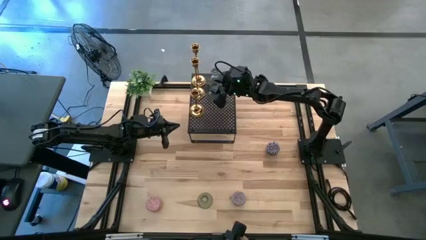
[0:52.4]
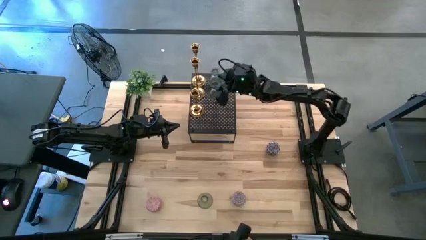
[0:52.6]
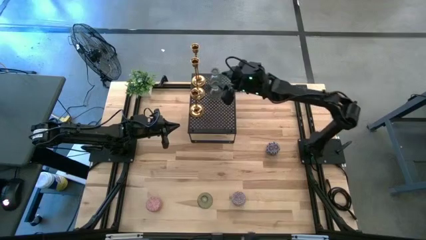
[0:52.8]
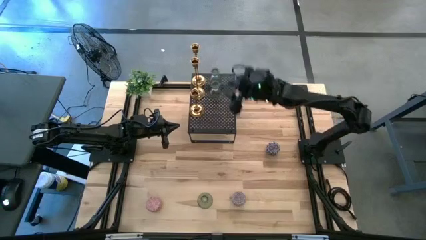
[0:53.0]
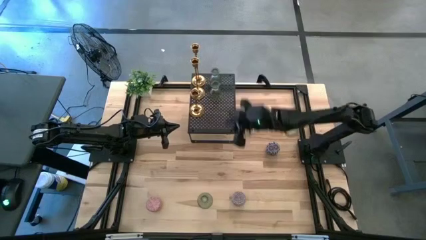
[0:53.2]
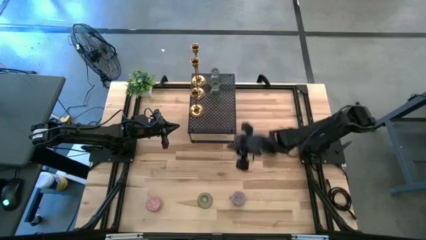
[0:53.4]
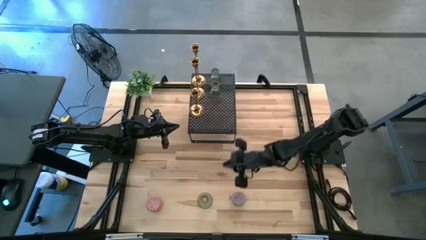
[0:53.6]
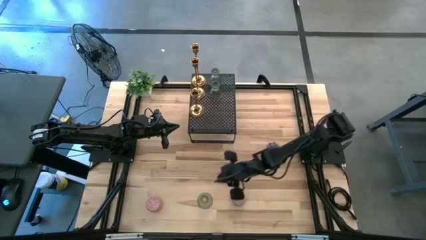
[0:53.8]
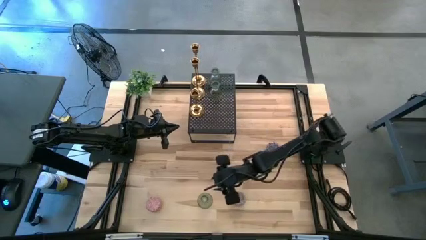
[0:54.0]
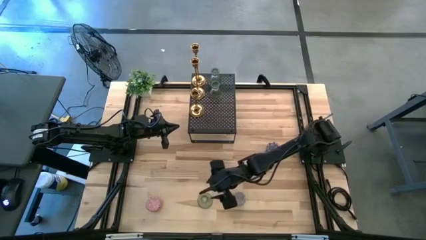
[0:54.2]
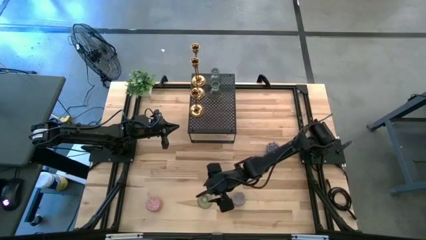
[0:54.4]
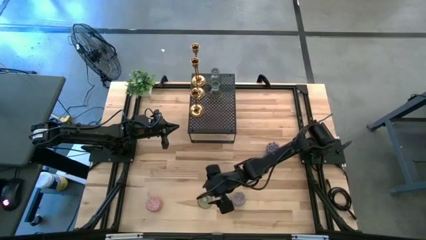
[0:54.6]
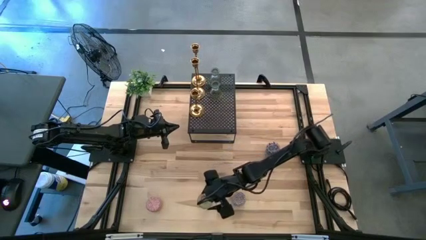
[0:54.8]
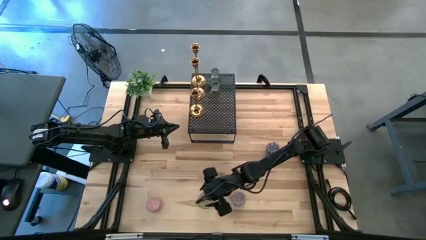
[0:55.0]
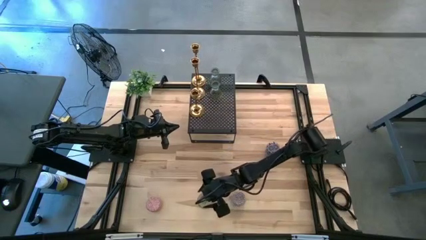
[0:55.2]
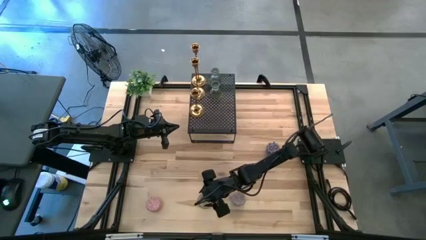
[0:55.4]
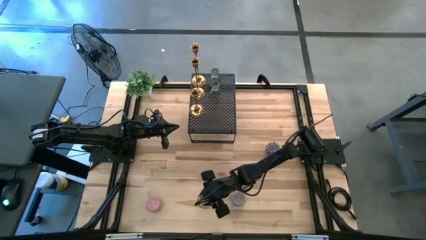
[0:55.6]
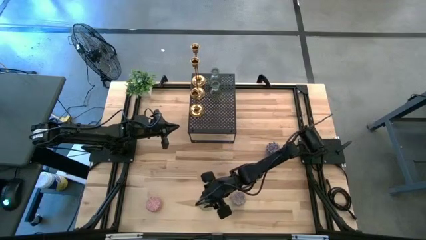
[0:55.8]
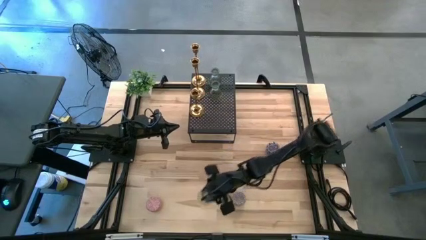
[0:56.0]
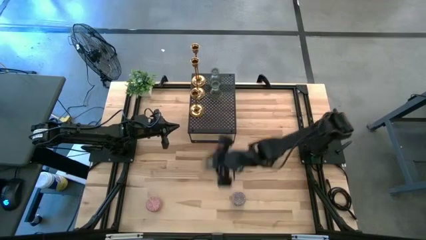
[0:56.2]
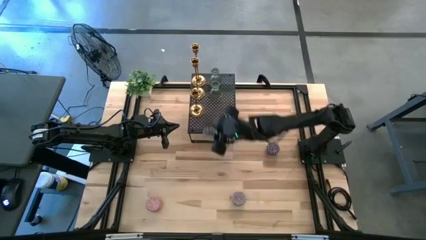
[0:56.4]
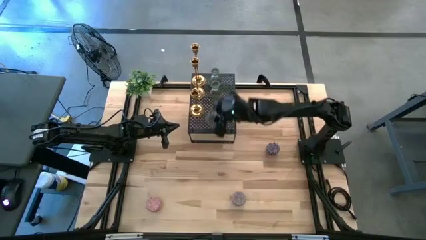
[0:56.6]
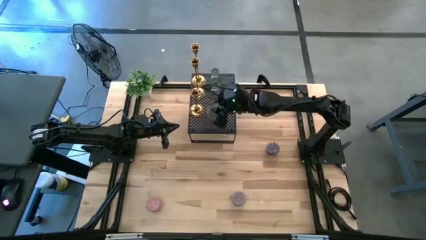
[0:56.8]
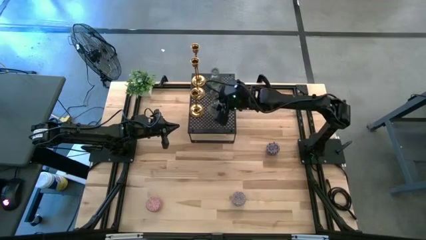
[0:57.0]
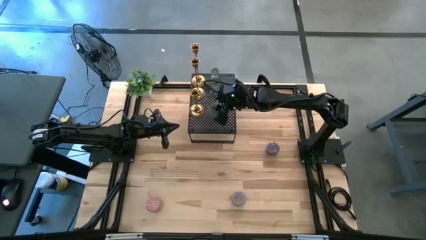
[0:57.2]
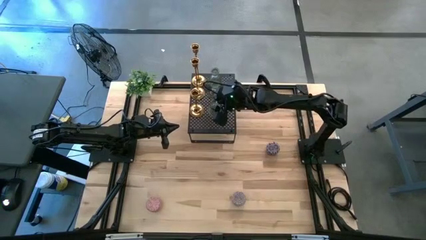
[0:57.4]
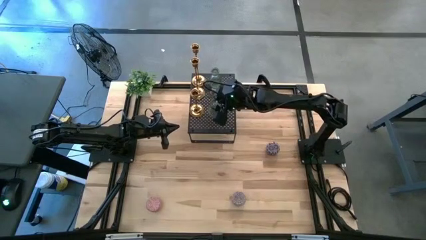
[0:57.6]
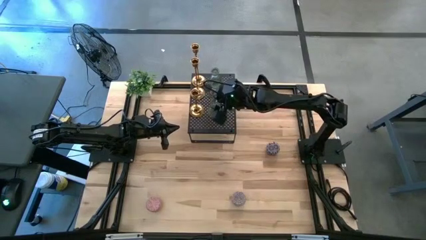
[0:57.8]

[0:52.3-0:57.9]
Task: Pick & Place candle stick holders
Put the transparent candle holder on the shelf aligned with the other transparent candle holders

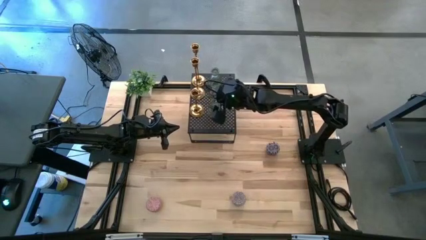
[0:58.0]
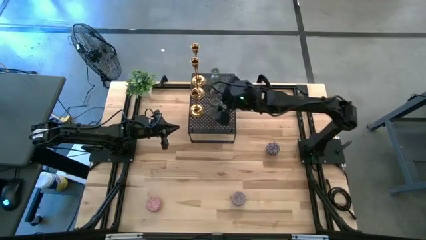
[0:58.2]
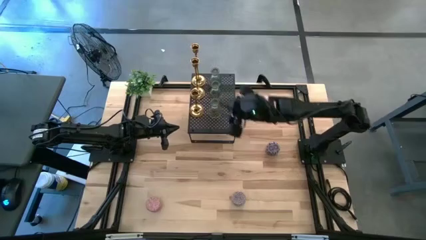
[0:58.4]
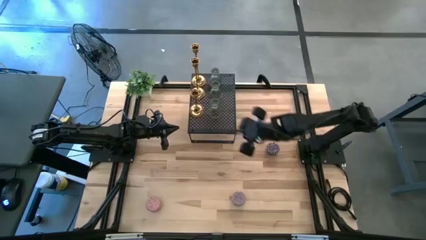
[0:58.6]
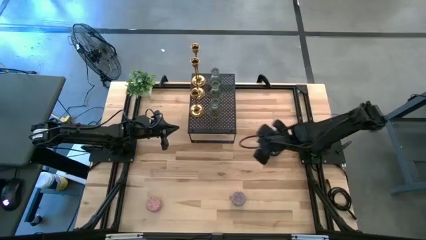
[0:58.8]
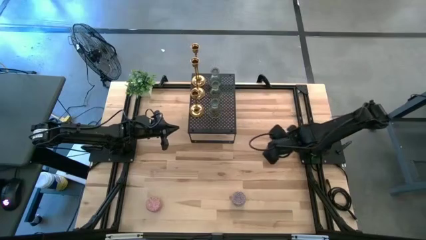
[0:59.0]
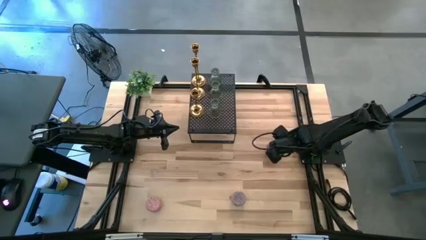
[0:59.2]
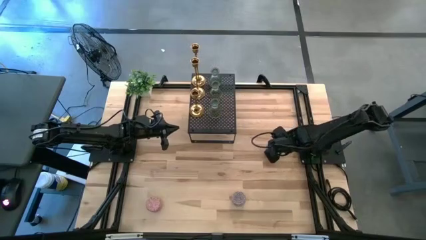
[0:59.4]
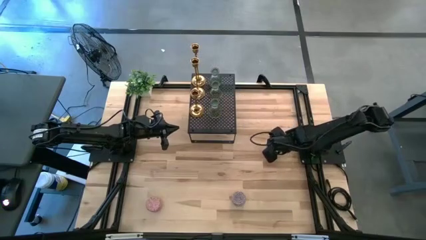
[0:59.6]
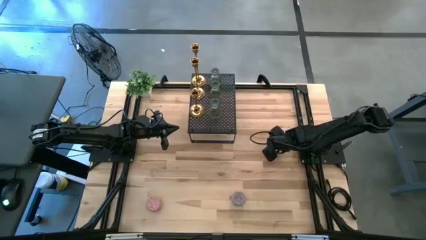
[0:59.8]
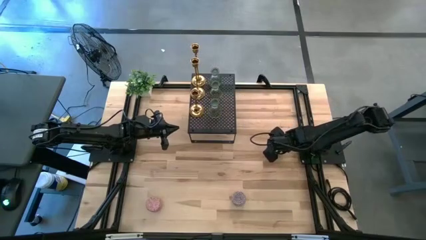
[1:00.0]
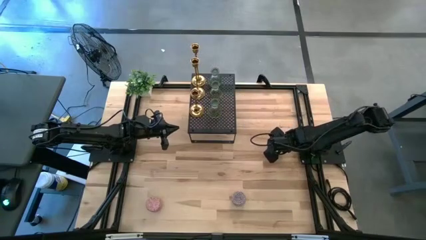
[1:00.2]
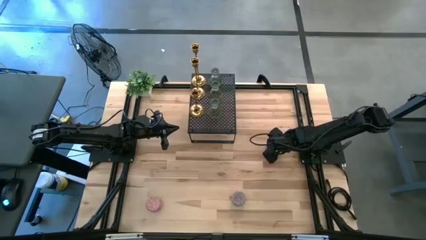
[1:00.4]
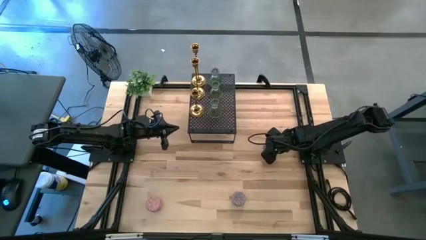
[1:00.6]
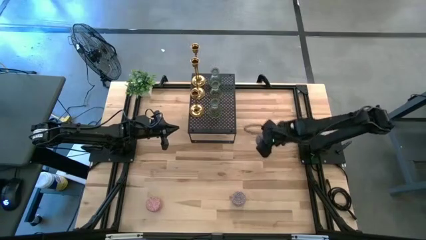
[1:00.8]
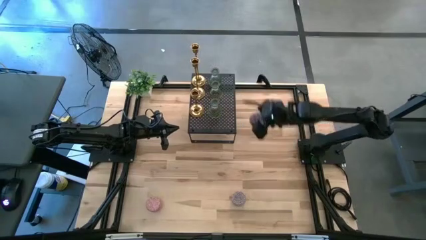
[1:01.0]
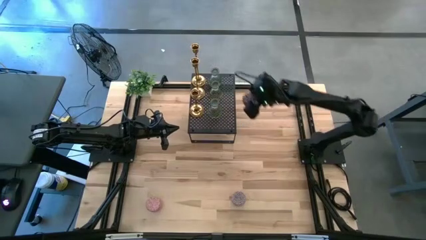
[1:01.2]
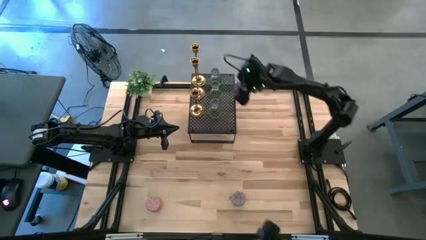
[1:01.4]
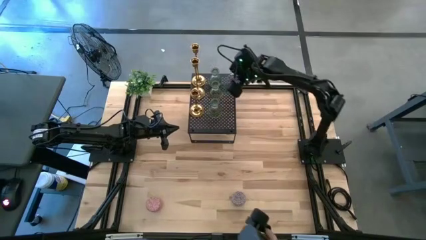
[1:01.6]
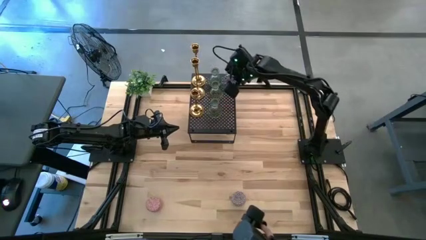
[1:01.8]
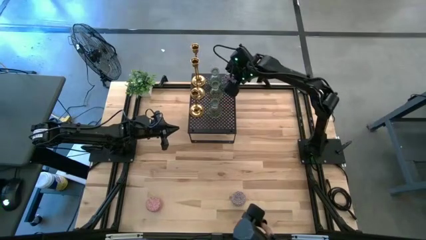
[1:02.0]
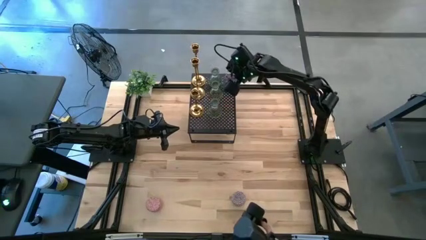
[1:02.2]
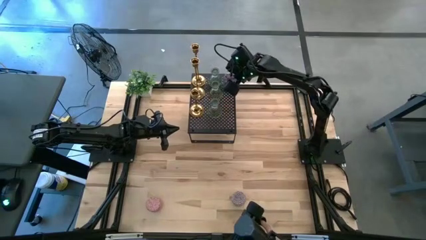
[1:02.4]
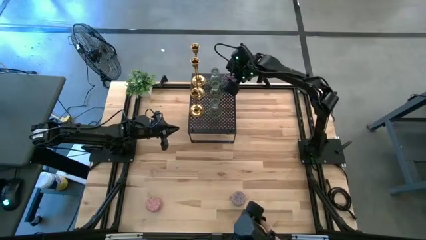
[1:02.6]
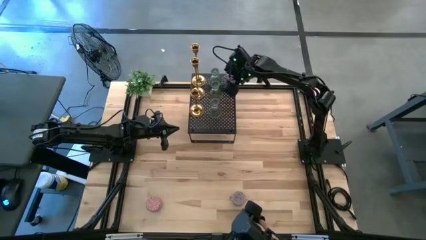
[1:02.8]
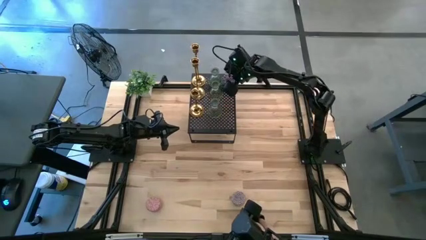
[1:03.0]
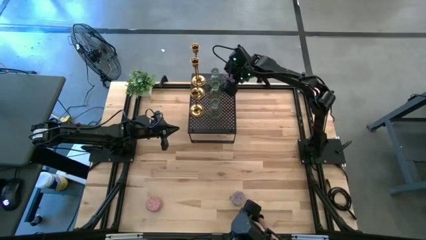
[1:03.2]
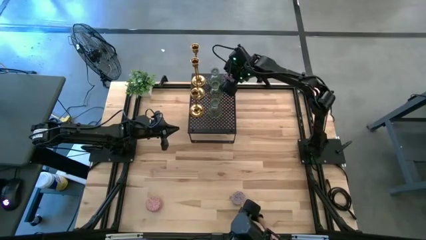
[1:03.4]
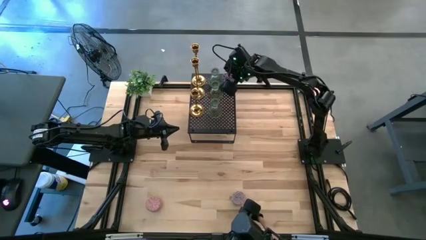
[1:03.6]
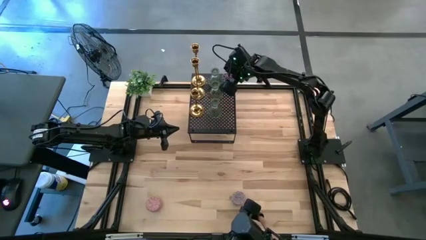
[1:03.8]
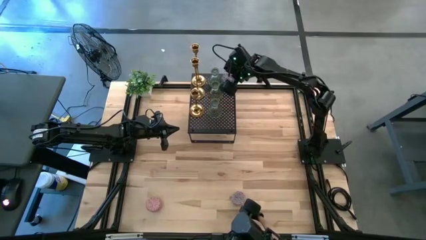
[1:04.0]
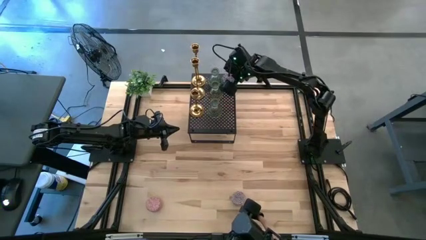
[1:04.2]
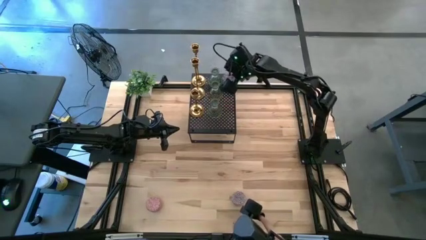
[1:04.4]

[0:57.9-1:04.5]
Put the black and red candle on the shelf

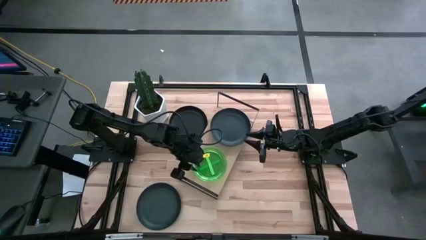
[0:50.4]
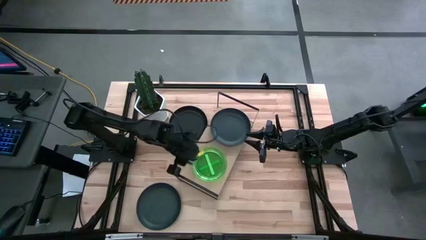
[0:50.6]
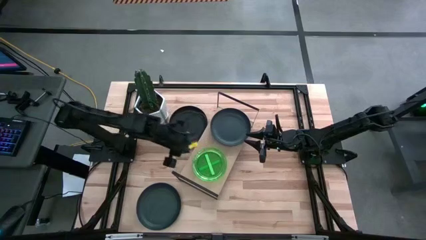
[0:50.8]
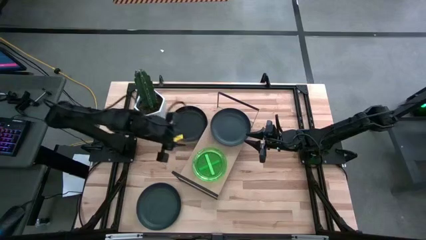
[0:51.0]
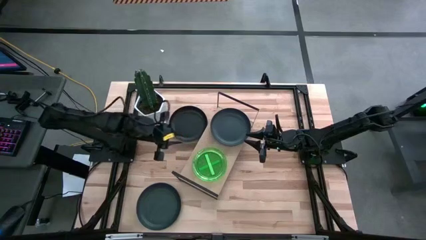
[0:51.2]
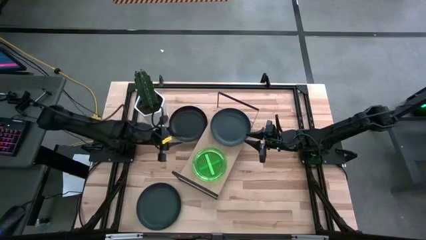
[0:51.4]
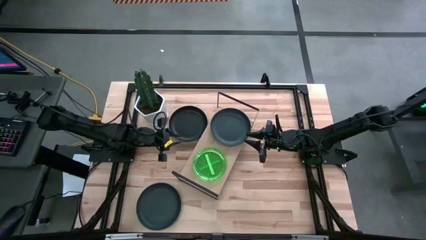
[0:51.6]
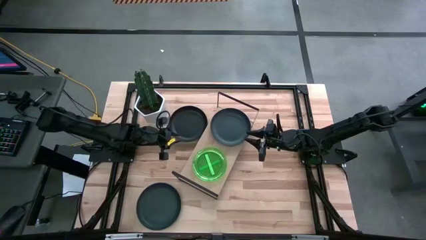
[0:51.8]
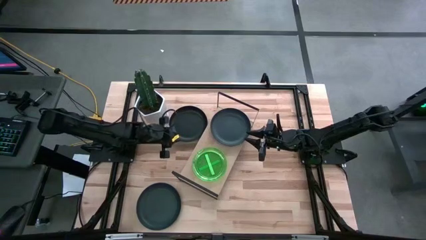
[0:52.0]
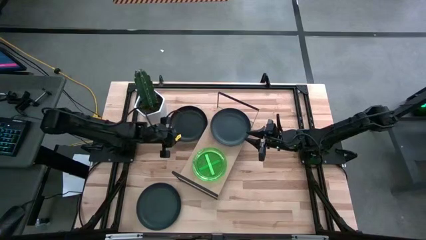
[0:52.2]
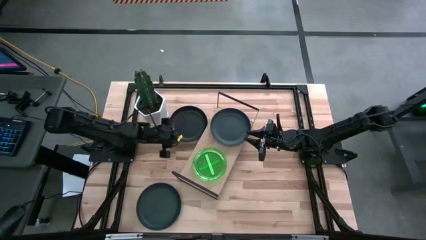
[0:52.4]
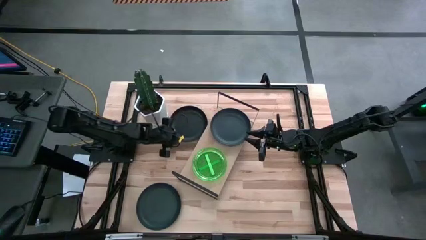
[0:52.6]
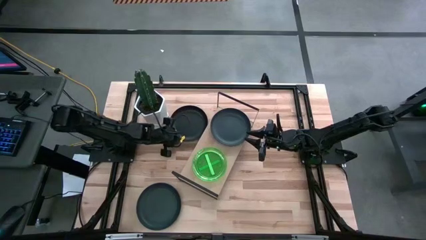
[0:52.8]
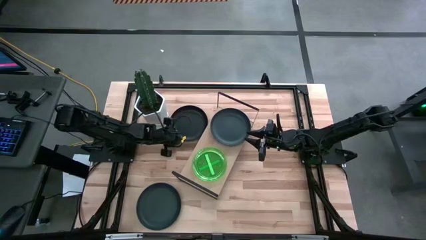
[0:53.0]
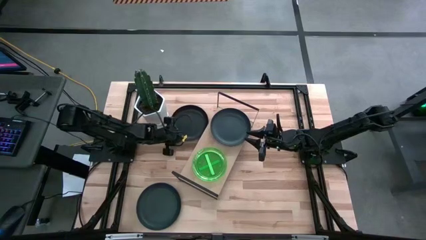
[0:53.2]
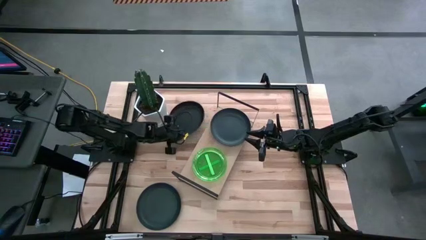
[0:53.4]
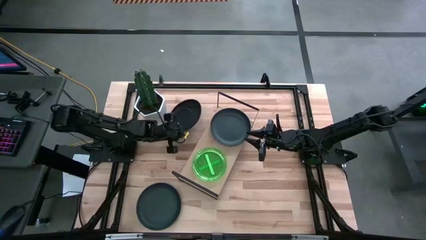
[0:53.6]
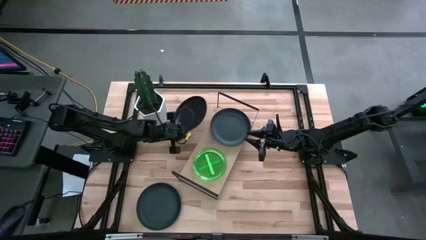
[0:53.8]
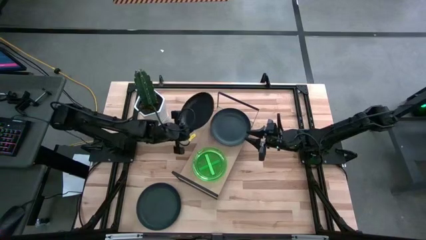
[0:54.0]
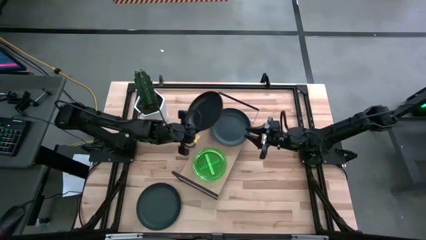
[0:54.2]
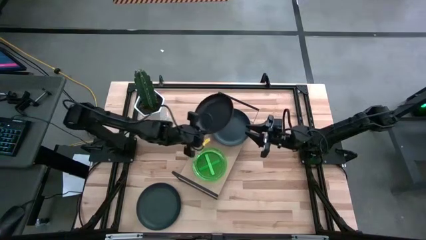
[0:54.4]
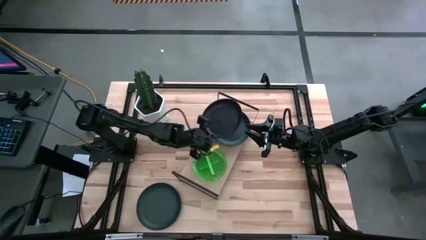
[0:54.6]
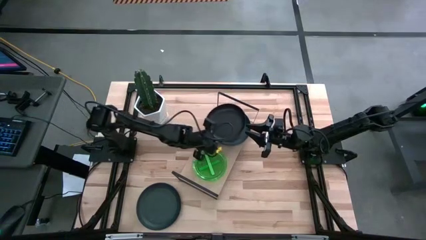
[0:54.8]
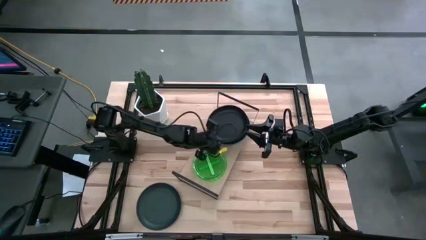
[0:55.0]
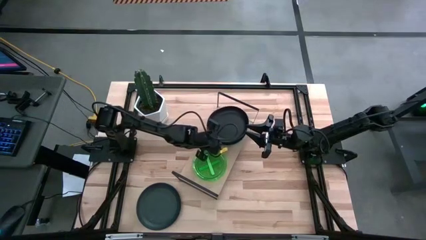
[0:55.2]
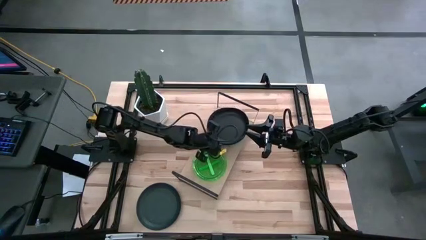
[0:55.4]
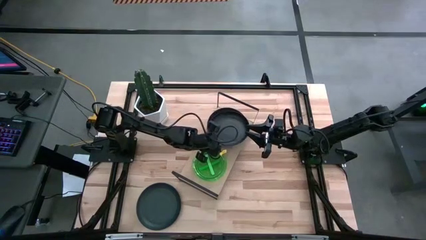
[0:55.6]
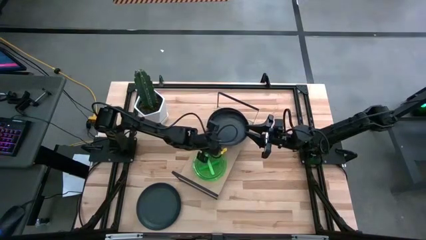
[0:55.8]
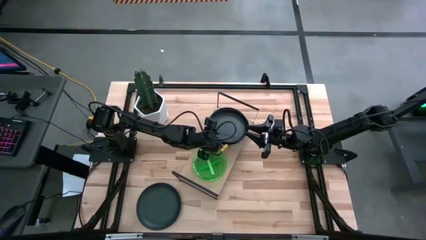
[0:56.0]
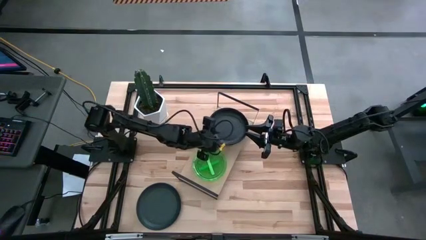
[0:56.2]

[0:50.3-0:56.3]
Task: Place and stack plates onto a shelf
Stack the top black plate on top of the black plate on the shelf
